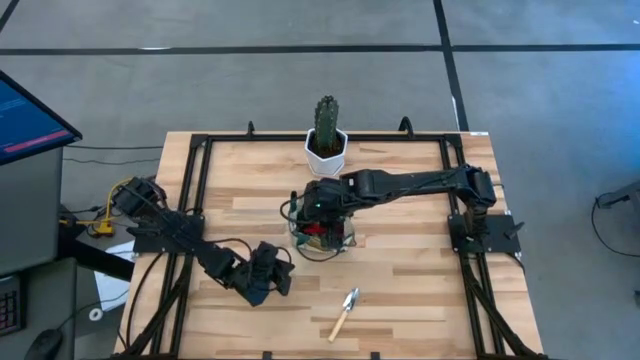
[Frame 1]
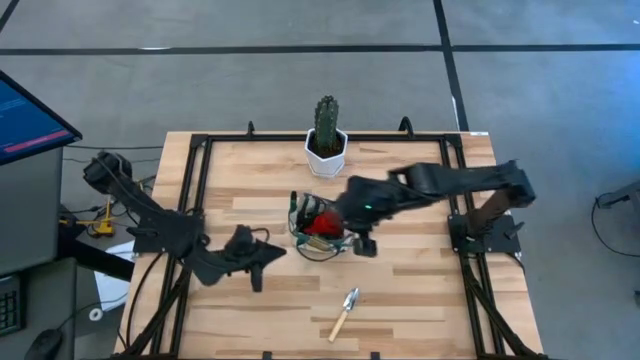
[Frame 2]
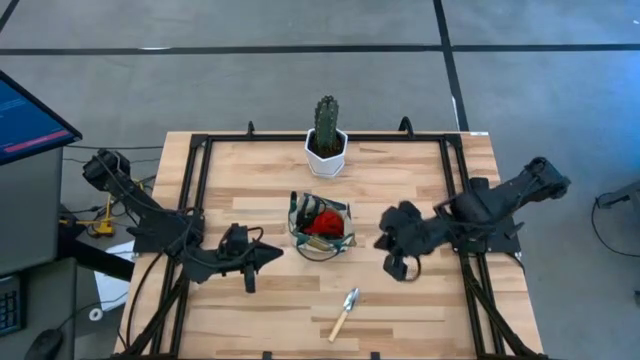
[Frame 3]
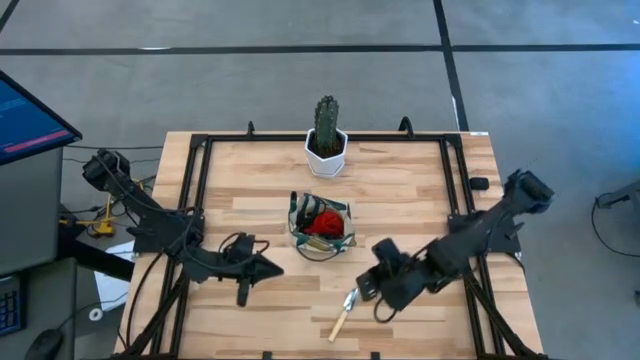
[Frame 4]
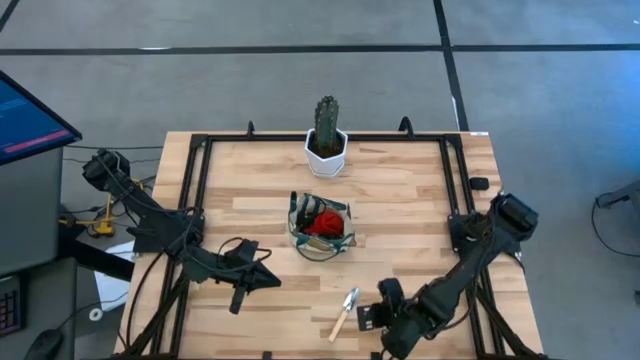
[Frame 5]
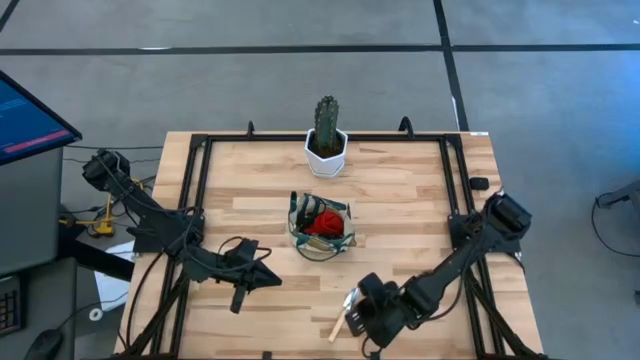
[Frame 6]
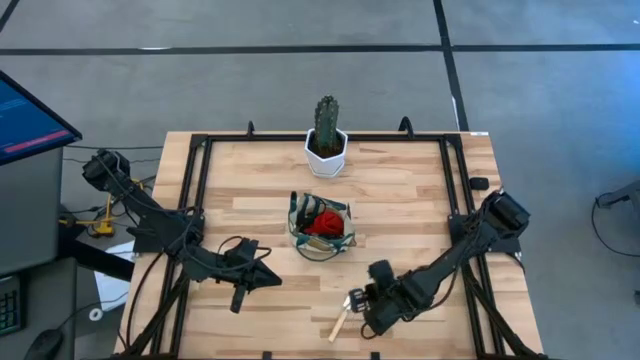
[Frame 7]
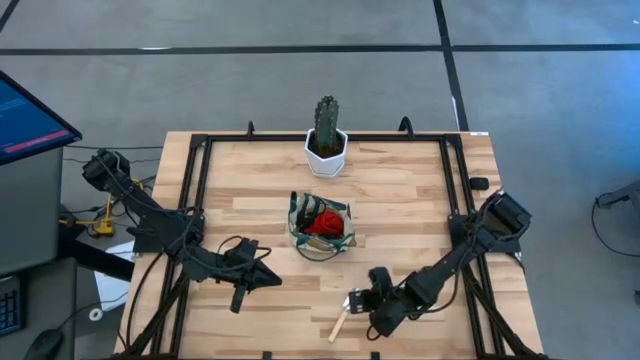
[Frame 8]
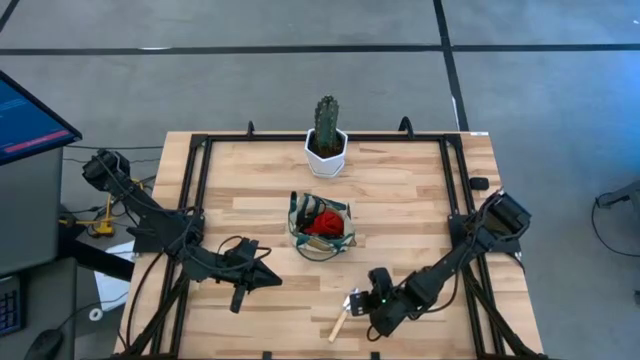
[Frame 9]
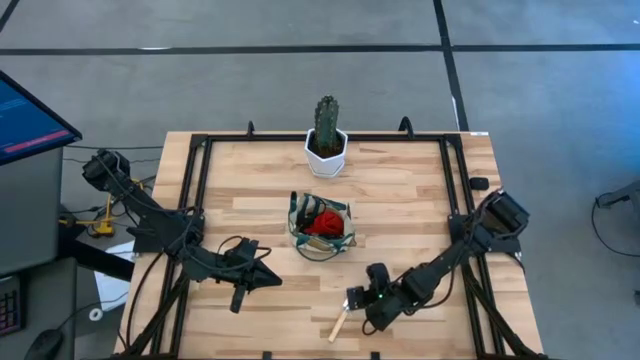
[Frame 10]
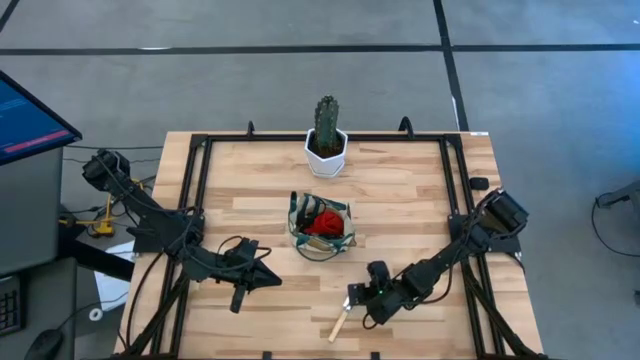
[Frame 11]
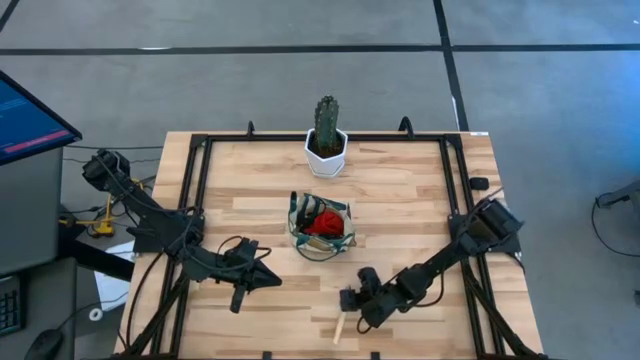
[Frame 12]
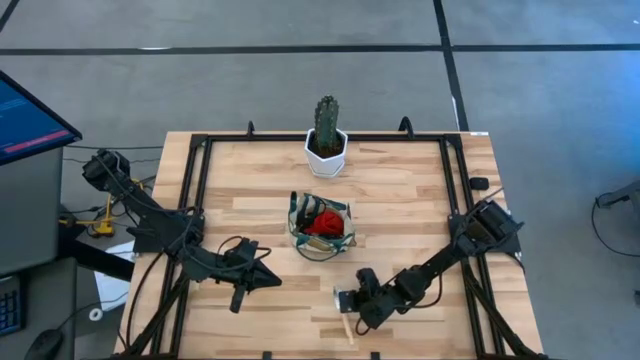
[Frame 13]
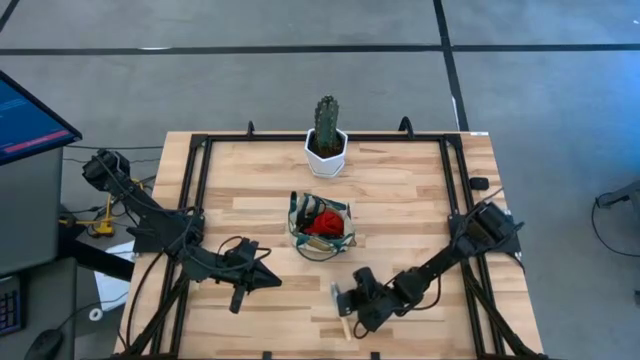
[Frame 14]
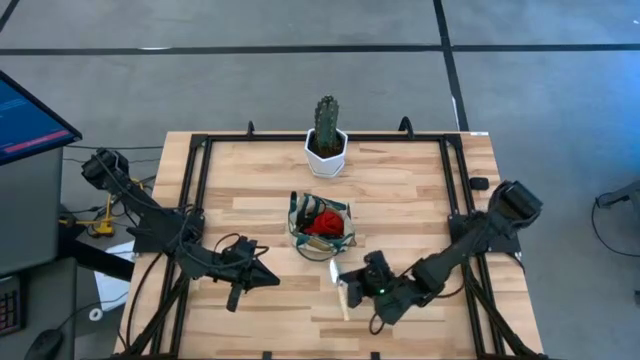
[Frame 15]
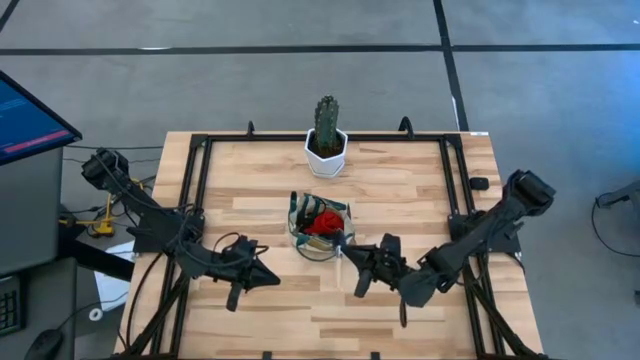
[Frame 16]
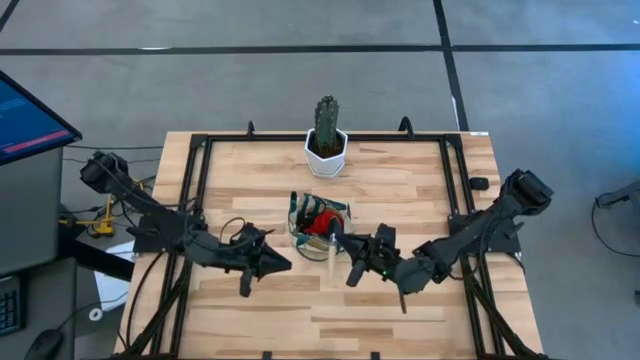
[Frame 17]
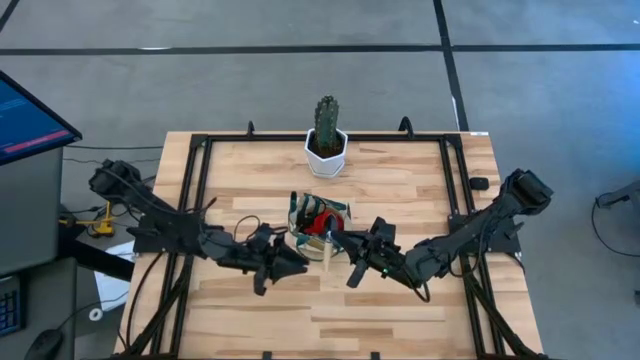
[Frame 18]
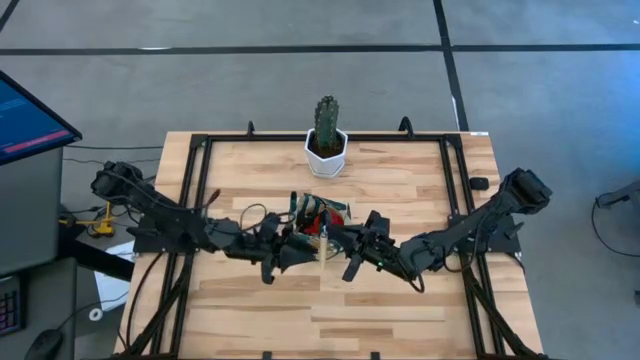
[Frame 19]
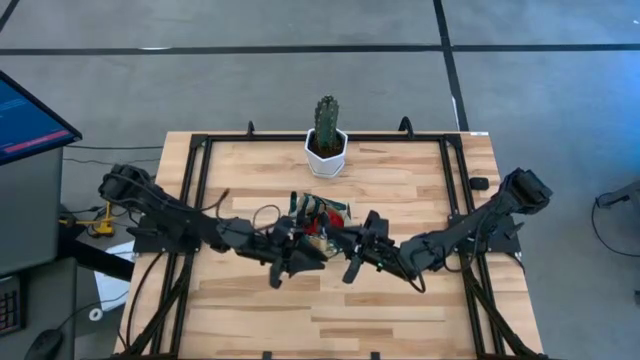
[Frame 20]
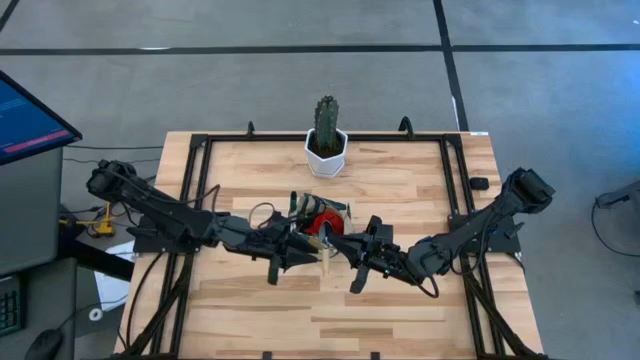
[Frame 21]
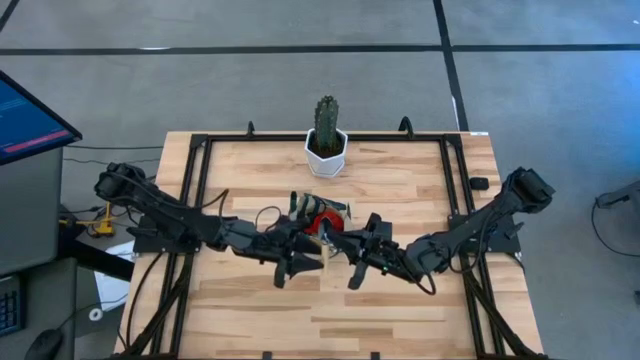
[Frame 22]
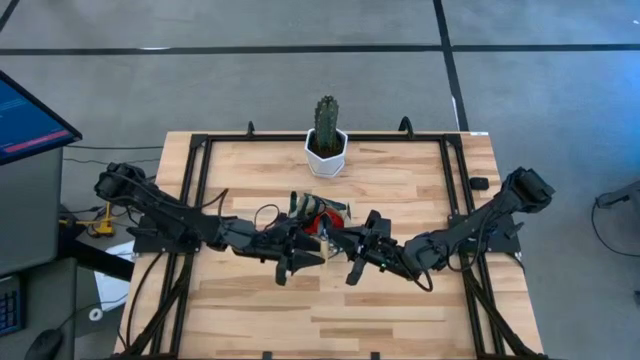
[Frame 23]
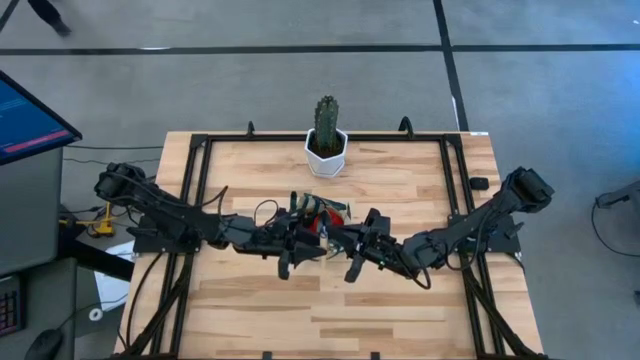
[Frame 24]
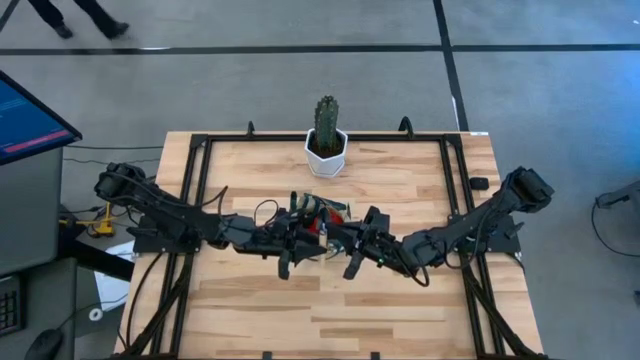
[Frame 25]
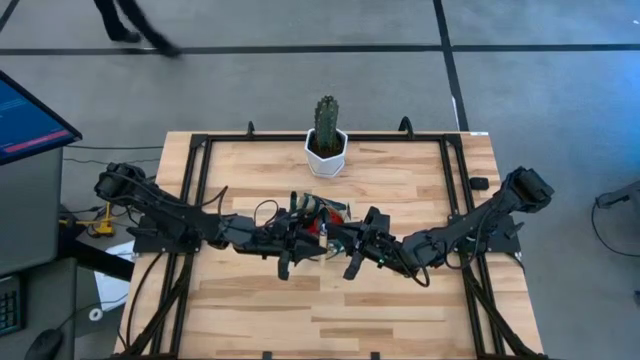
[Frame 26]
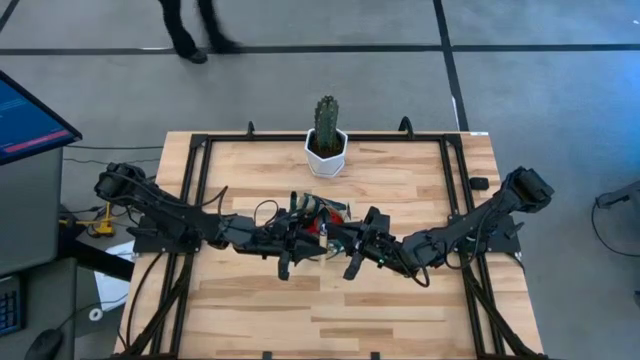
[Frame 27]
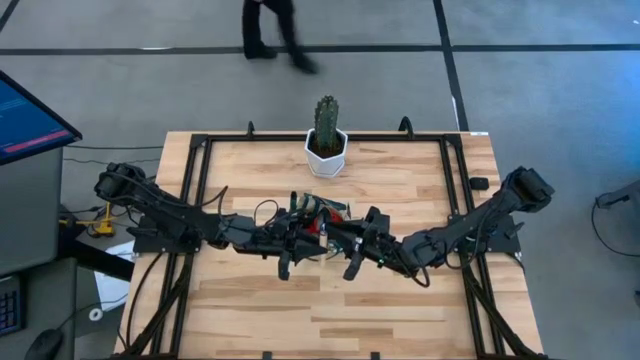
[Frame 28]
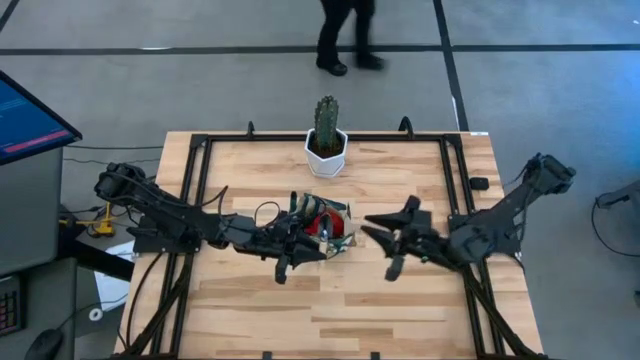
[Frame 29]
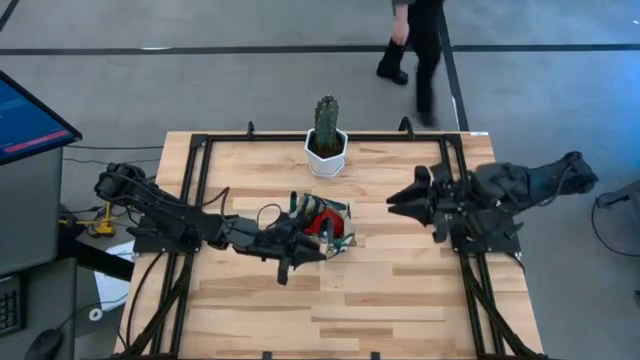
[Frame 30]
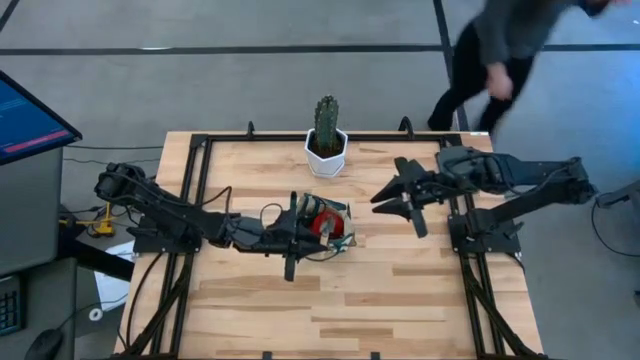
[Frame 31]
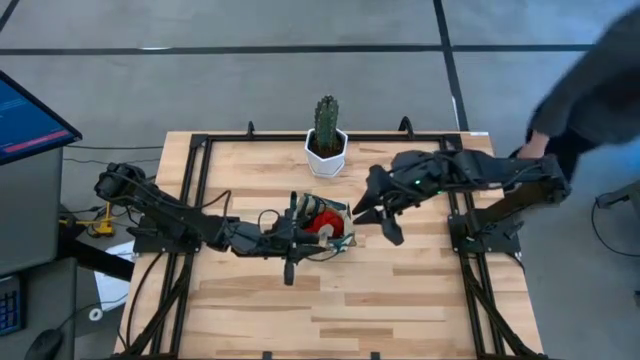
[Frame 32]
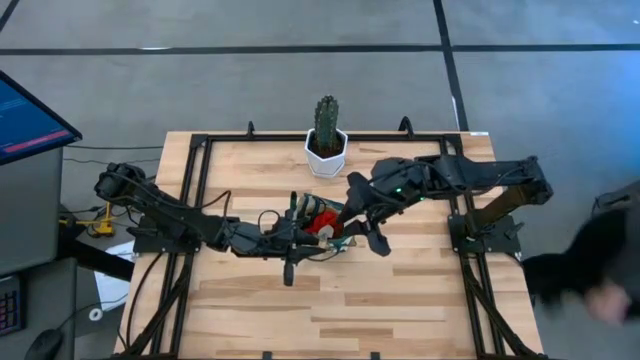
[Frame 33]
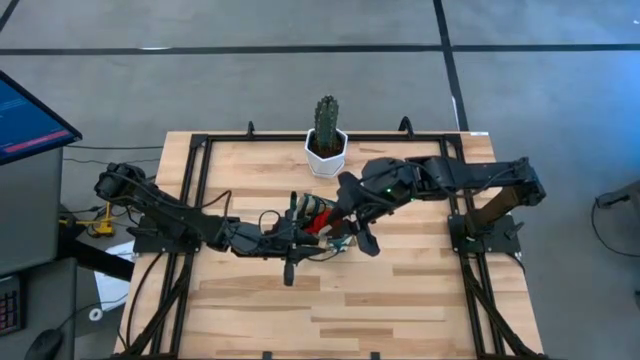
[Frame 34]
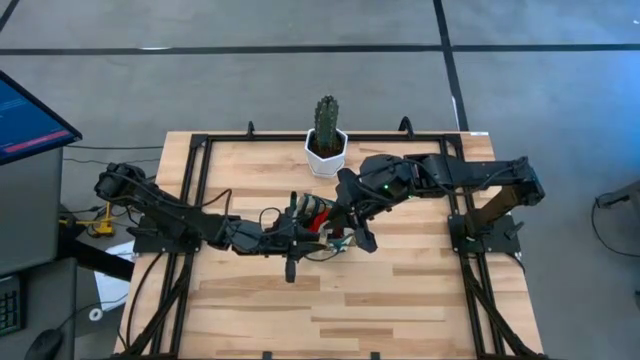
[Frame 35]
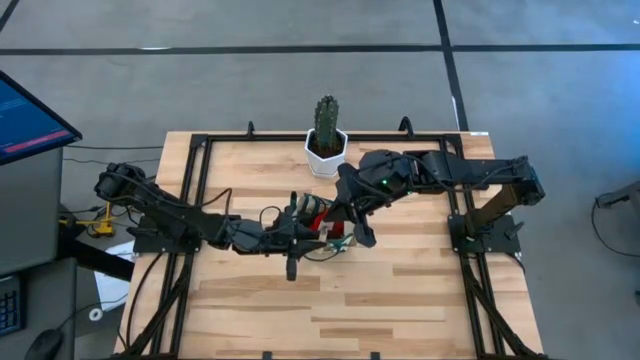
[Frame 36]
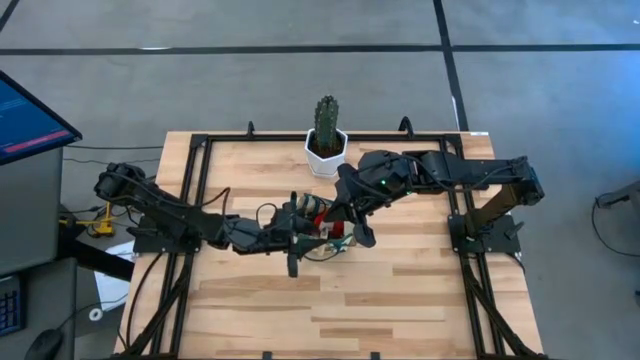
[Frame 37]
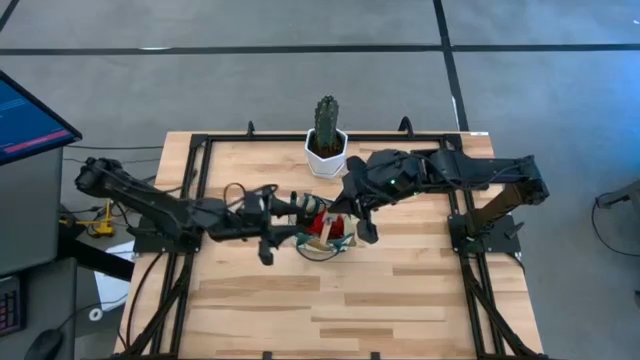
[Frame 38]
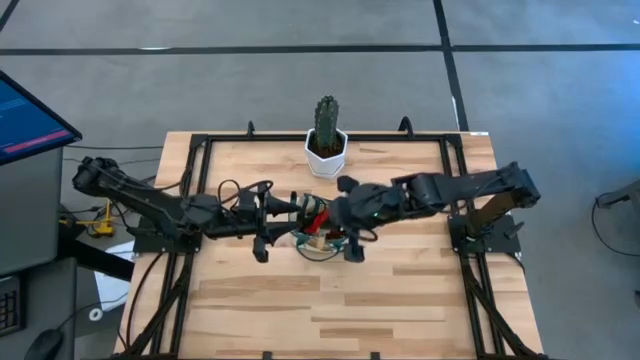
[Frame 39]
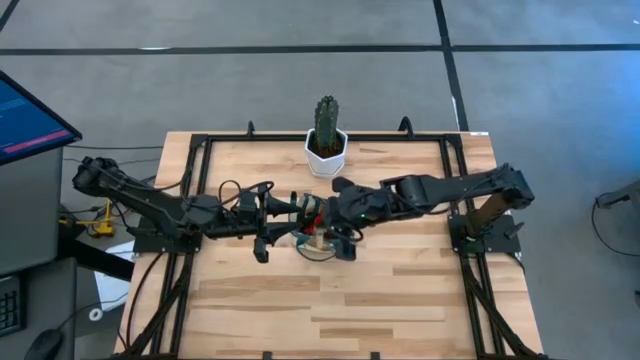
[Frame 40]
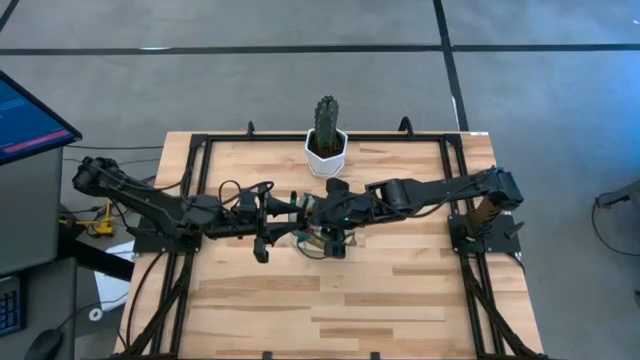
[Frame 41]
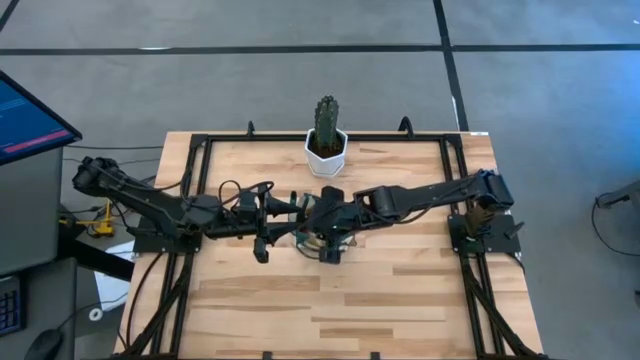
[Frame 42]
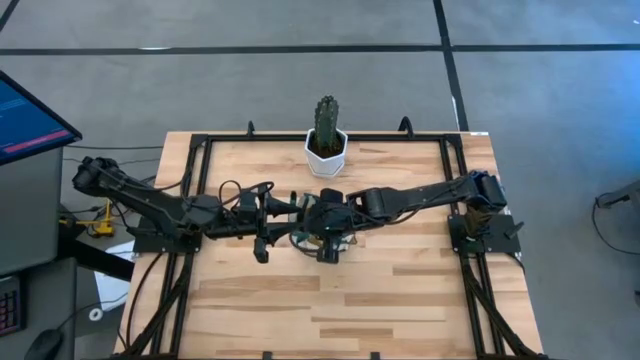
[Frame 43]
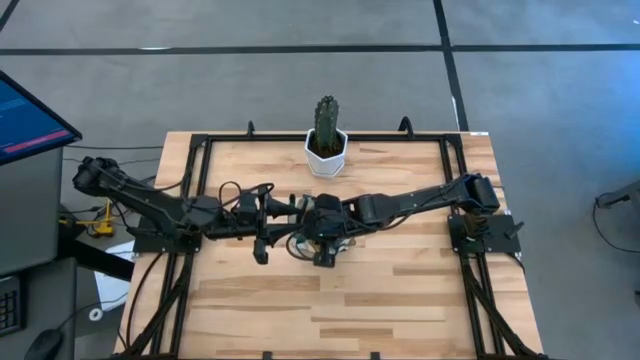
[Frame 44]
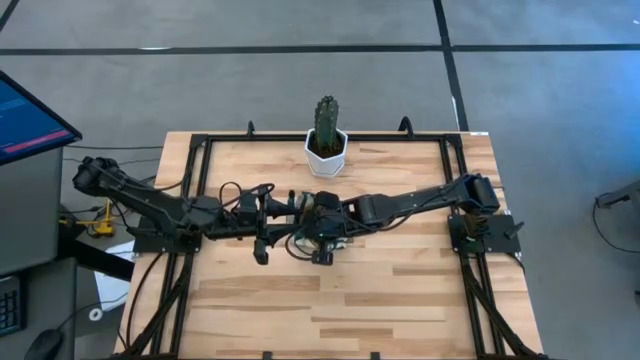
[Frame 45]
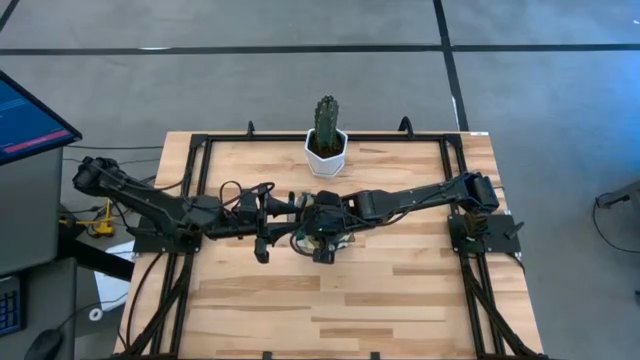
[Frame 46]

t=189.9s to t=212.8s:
Task: Pick & Place Garden tools in Gardening bag
Put the brown trowel into the gardening bag
